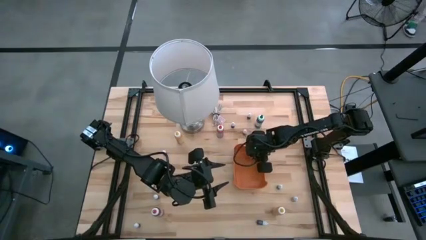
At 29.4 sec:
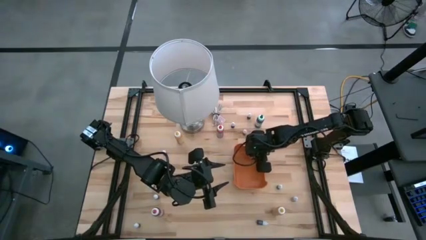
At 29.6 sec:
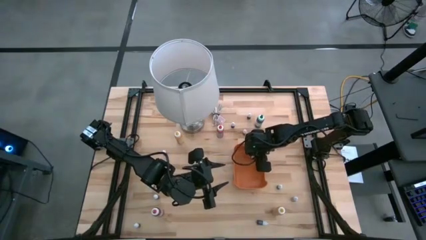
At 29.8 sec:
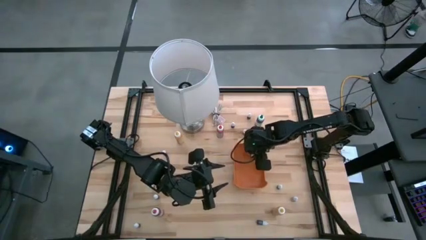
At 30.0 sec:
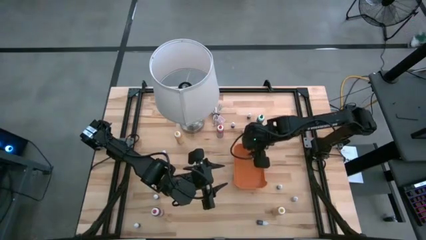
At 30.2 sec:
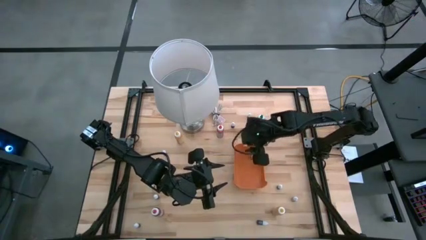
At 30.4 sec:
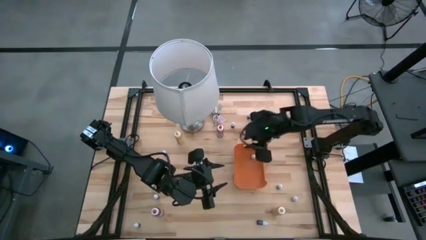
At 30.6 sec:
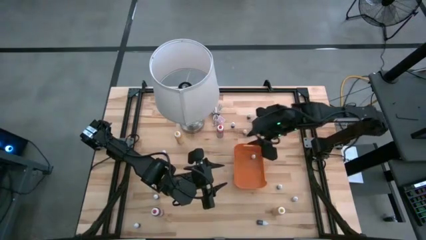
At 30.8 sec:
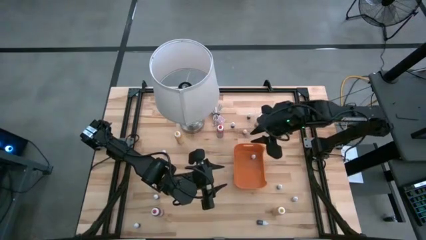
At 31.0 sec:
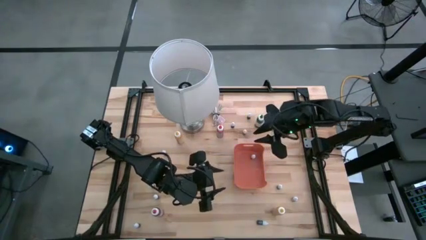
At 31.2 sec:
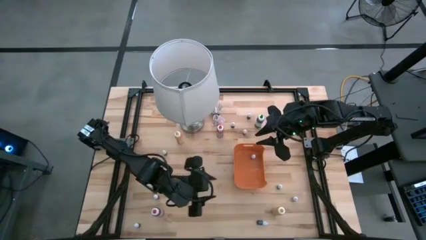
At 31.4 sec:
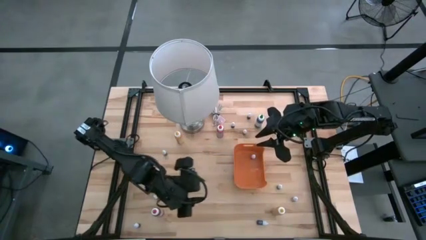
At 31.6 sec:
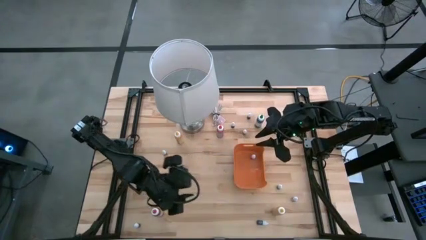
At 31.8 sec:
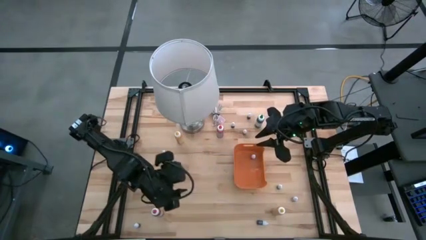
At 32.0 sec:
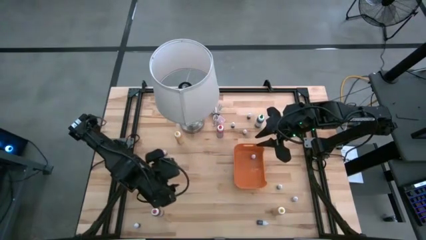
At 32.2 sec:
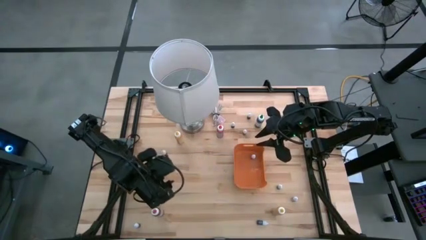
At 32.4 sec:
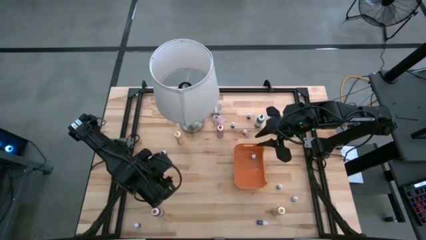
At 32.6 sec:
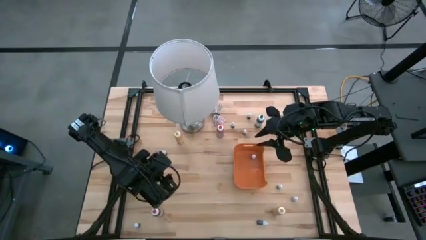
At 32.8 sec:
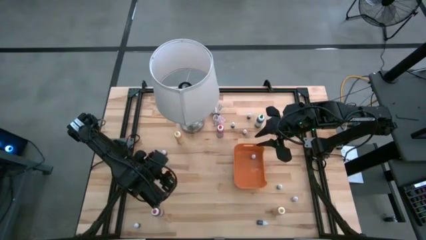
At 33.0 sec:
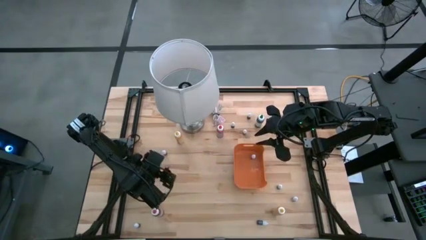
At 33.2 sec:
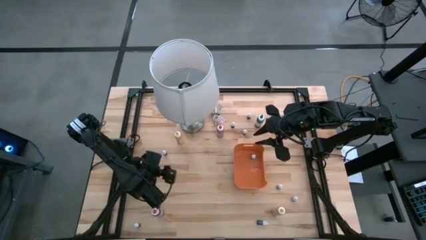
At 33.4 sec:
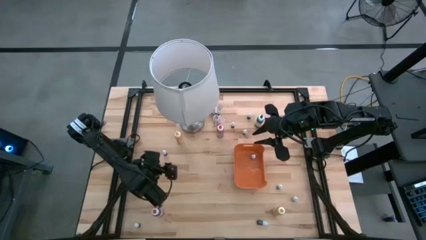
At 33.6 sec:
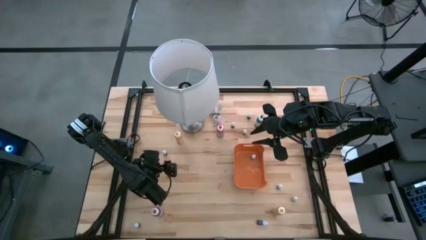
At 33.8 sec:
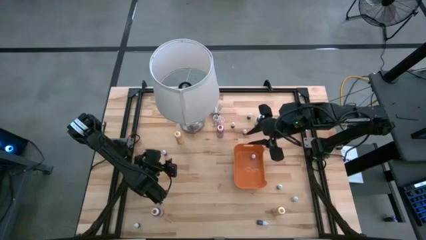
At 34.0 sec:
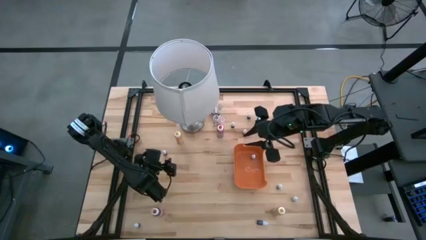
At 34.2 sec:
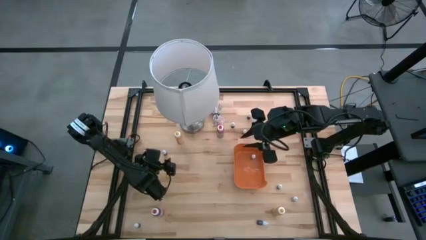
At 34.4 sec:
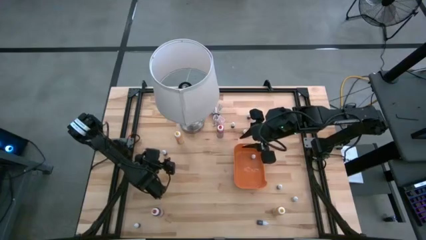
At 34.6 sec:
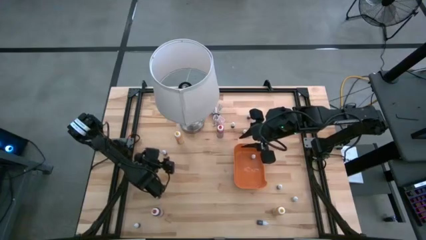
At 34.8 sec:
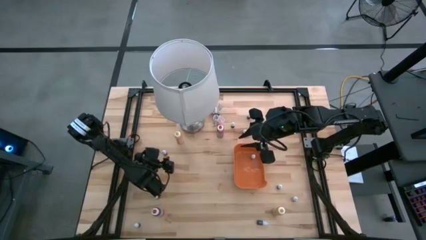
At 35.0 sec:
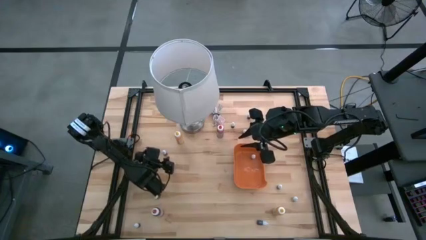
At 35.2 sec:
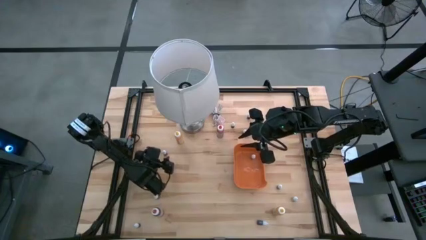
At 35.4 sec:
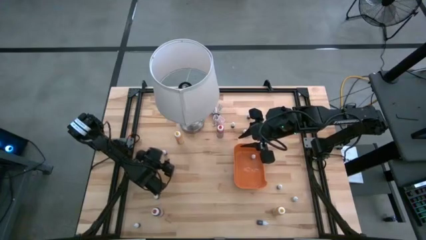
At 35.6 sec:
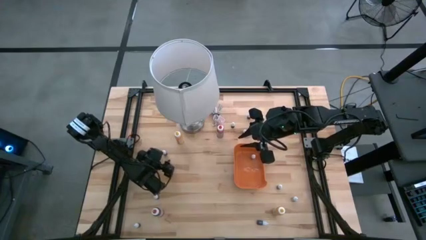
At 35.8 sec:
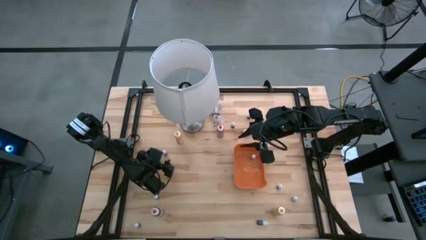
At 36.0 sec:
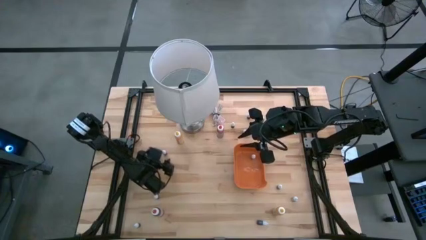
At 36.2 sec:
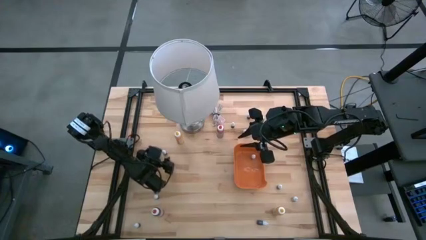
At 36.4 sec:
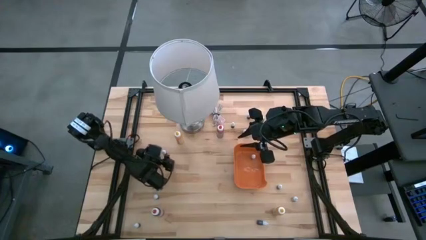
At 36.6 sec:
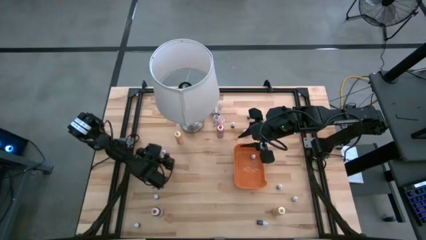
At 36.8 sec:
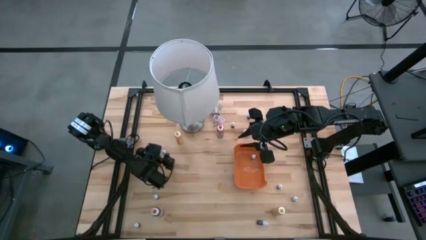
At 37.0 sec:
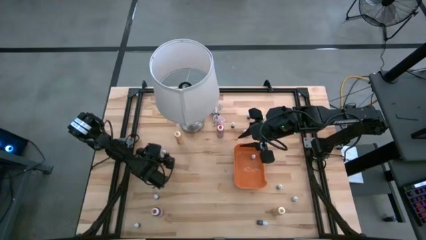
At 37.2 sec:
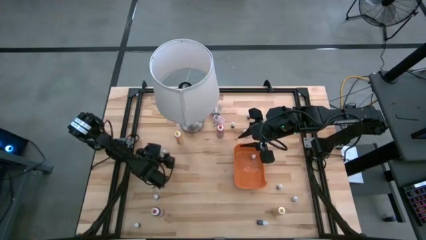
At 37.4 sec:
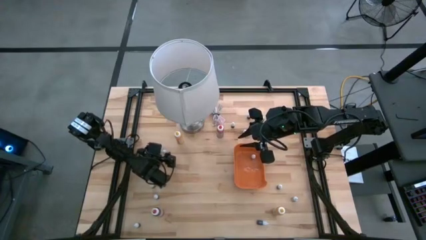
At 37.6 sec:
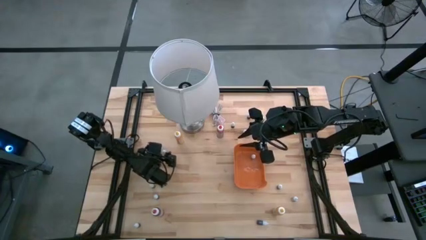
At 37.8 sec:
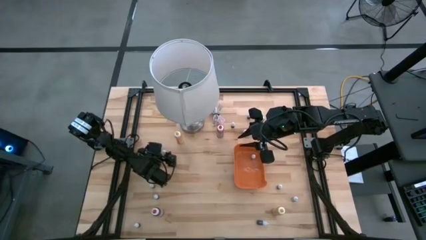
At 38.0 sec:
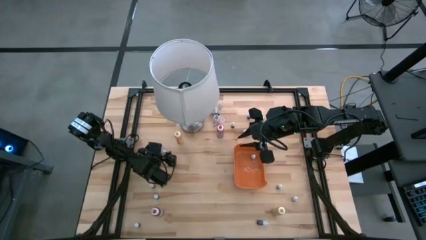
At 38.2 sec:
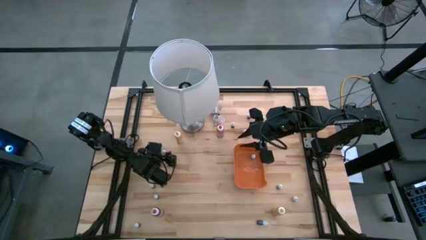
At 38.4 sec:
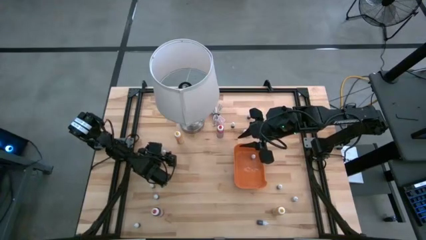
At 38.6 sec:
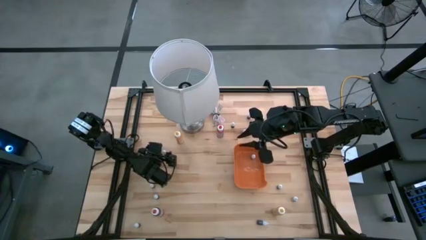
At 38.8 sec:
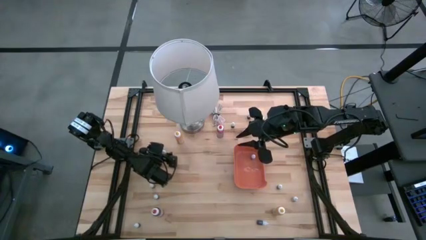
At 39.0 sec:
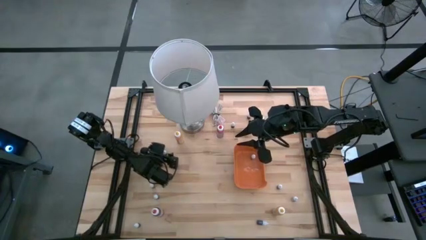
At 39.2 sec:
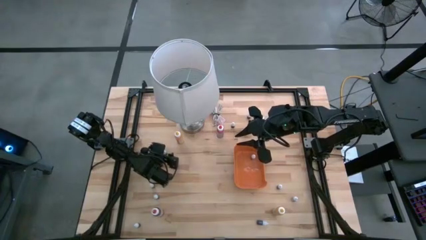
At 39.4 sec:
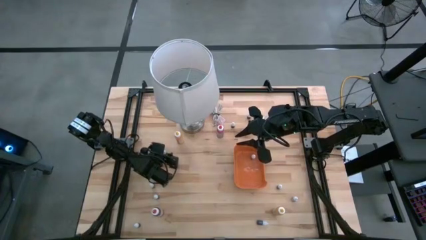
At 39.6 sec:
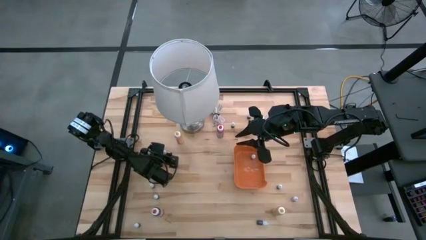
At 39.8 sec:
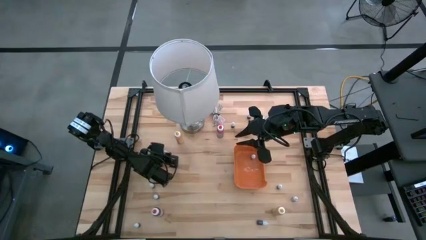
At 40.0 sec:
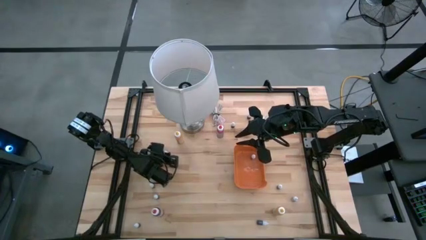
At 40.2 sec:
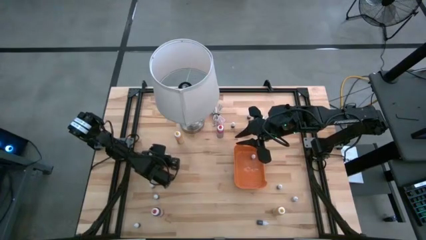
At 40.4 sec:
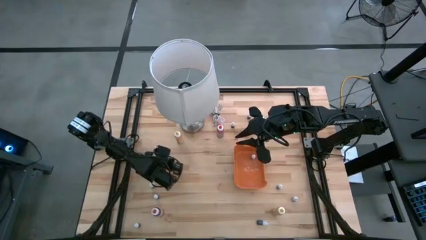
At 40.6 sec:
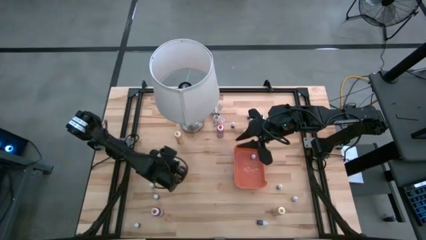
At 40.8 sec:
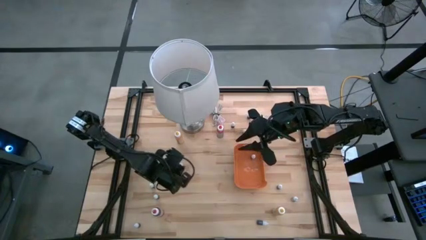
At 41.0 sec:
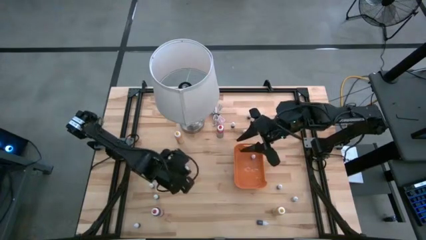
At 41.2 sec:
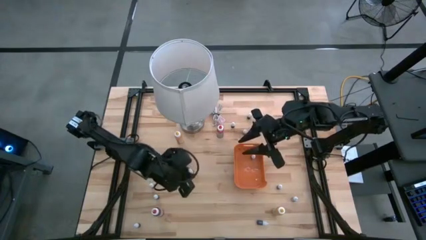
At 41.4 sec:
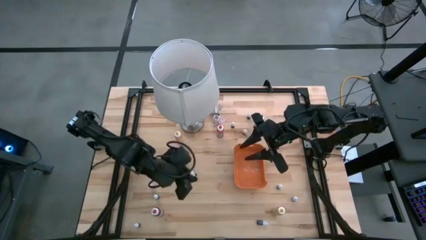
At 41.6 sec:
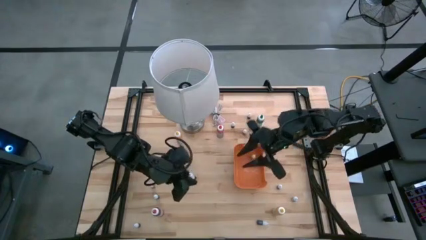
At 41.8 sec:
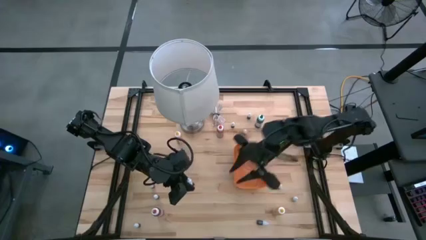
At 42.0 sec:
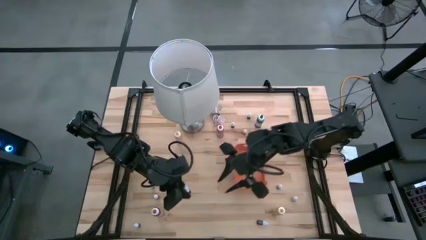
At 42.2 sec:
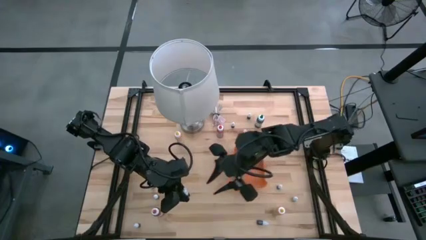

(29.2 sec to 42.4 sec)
Task: Pick & Place food coloring
Put the small food coloring bottle into the orange bin
